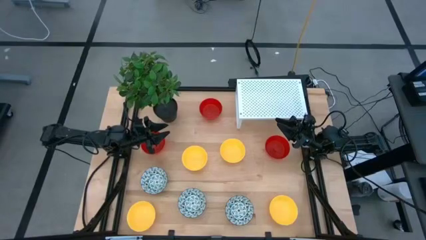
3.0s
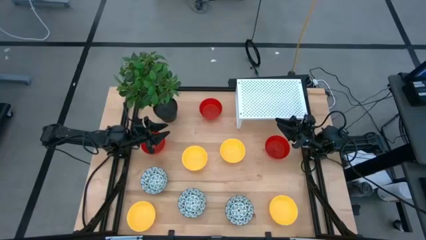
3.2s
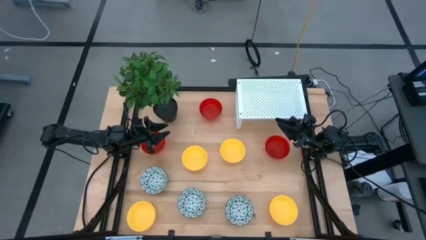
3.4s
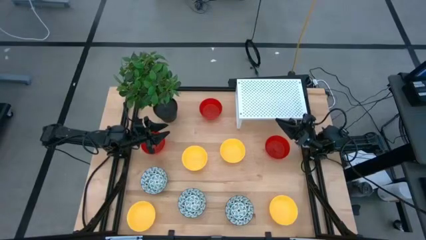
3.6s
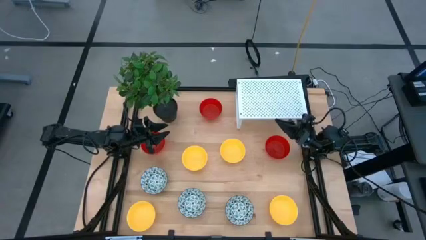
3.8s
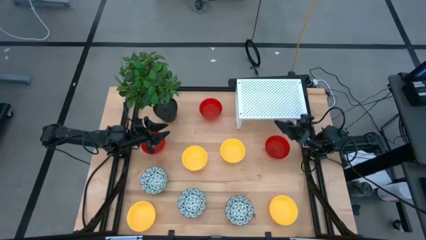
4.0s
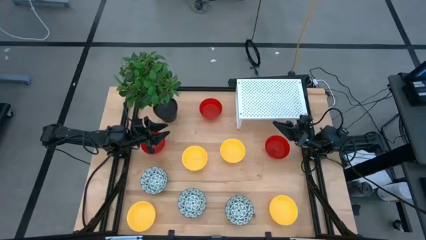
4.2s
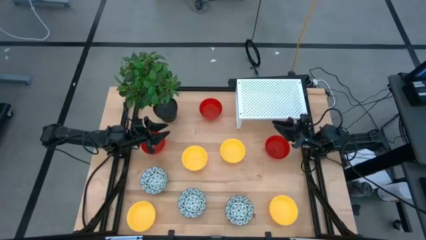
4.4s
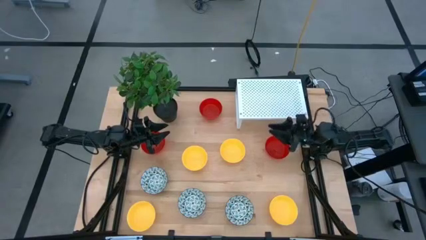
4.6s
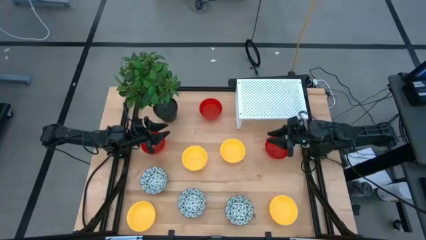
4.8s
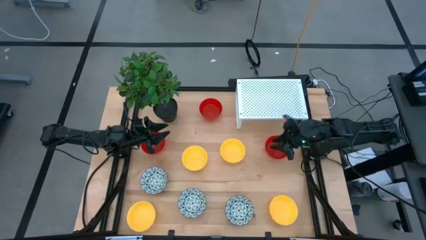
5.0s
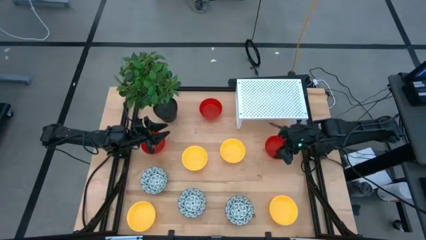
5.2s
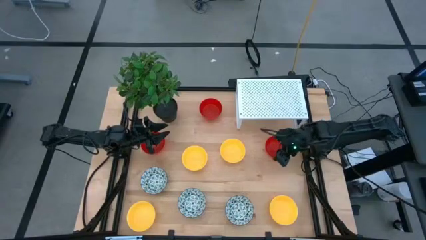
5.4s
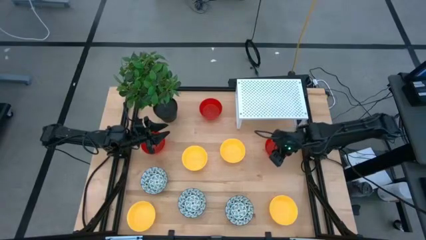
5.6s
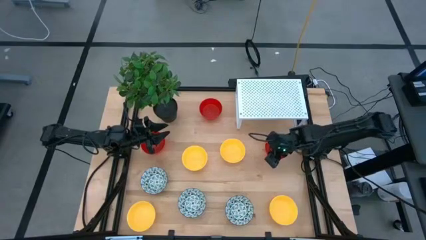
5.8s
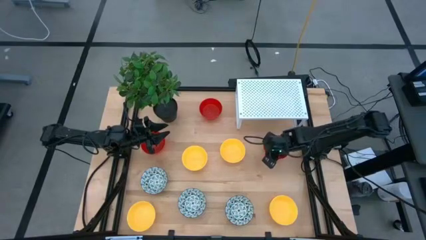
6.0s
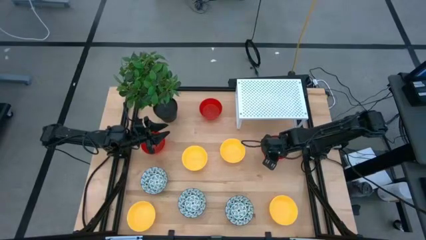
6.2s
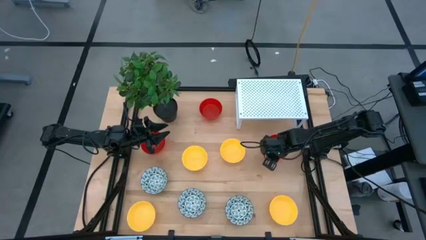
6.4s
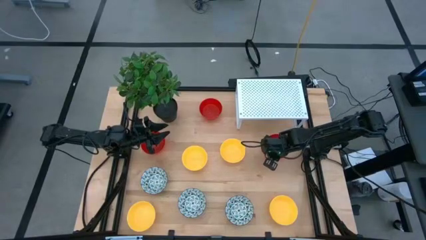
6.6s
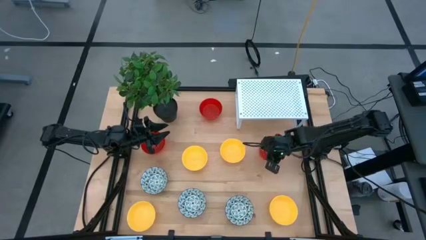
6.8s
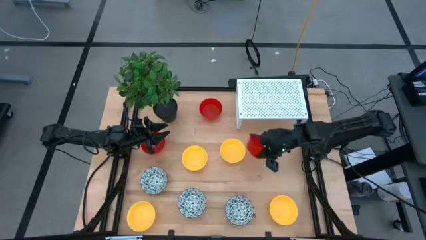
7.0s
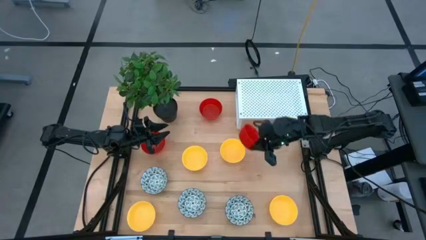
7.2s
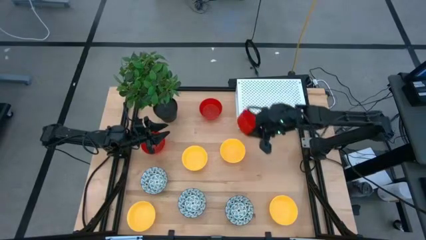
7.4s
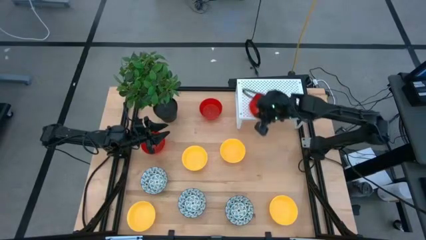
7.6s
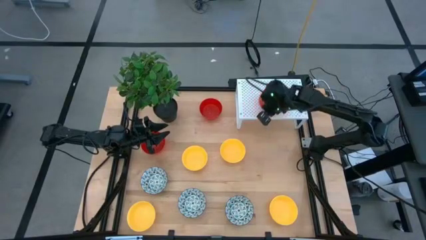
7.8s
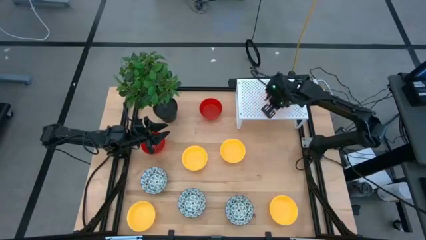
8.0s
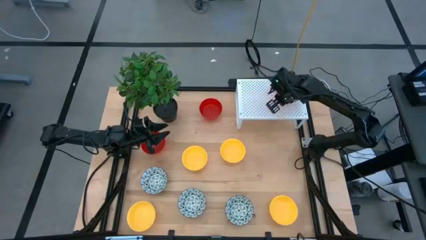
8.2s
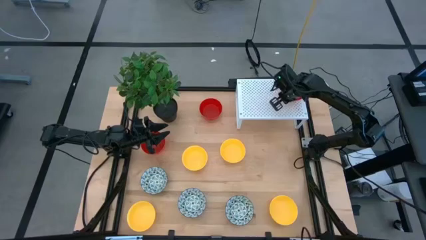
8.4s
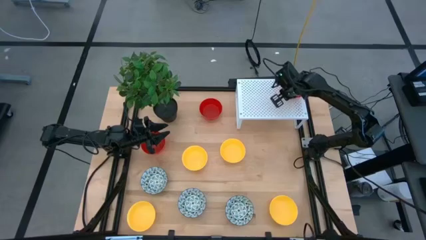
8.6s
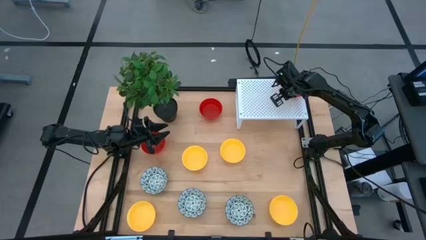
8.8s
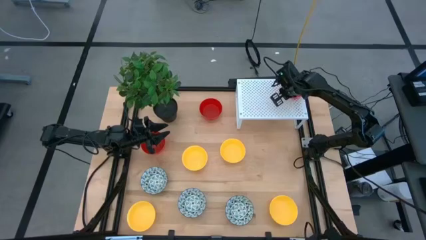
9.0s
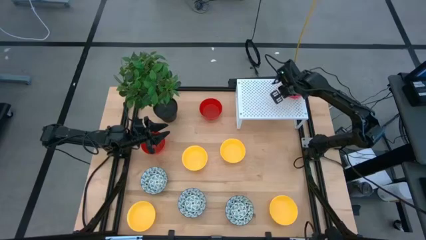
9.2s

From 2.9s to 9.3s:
Task: Pick & Place Mini bowls
Put the red bowl on the shelf

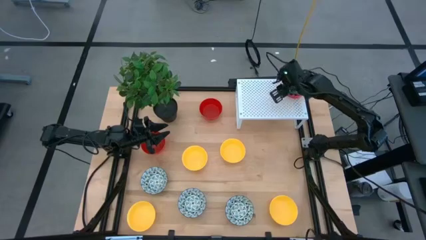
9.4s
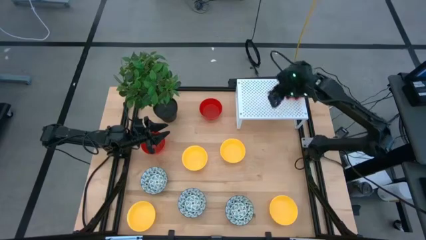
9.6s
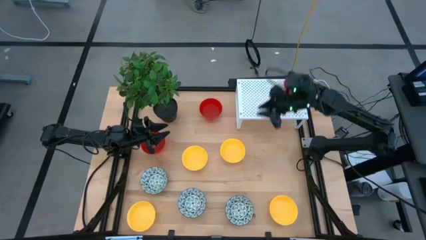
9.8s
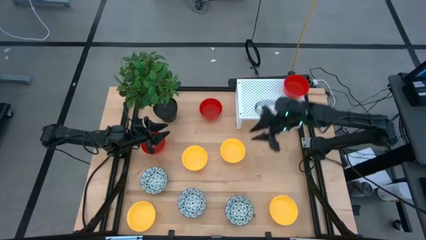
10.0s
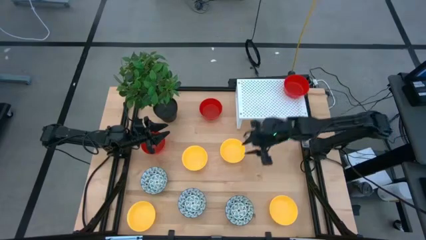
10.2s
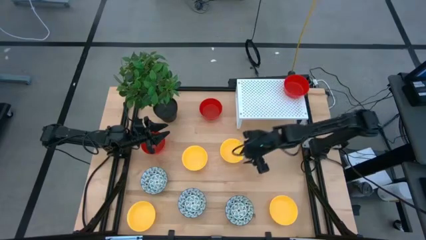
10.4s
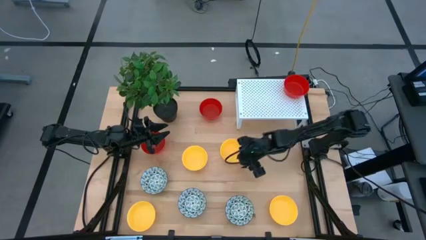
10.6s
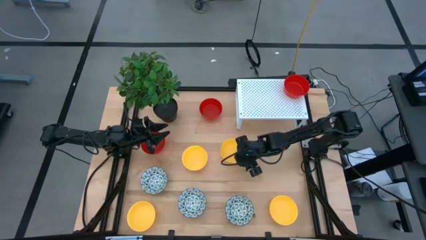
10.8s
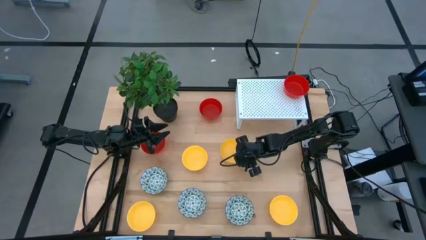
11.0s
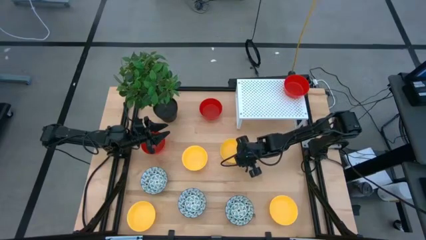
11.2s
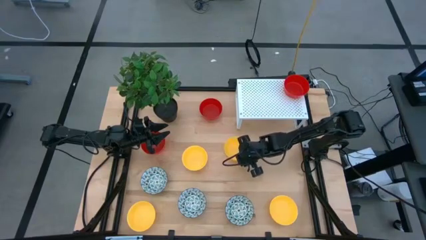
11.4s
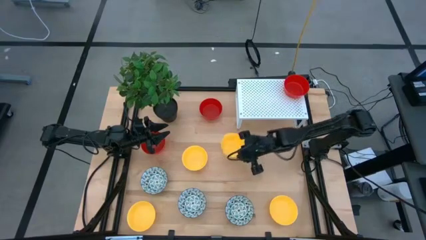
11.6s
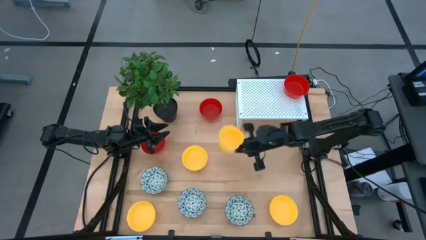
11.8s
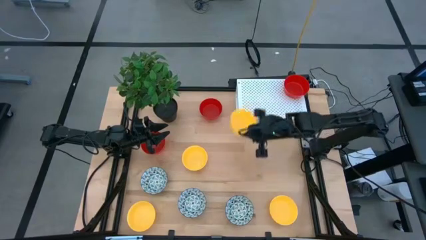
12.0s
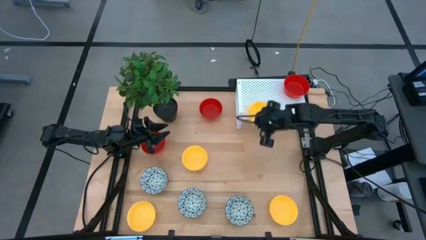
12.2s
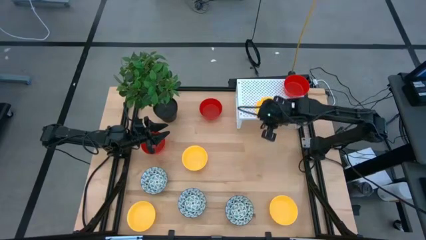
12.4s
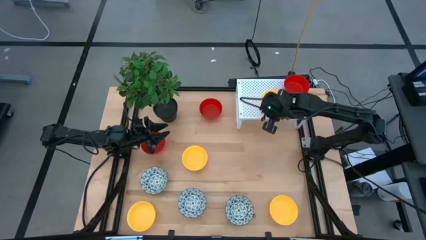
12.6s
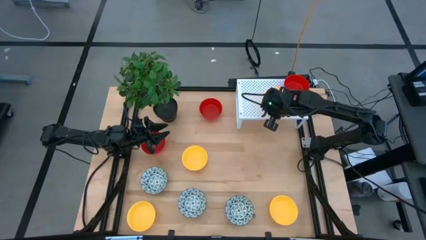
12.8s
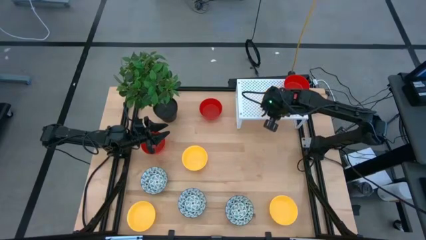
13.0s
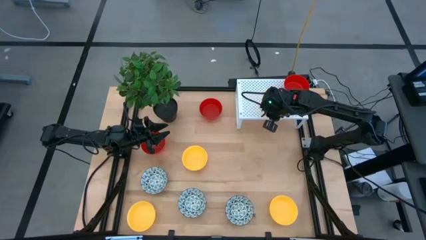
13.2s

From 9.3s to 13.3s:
Put the yellow bowl on the shelf

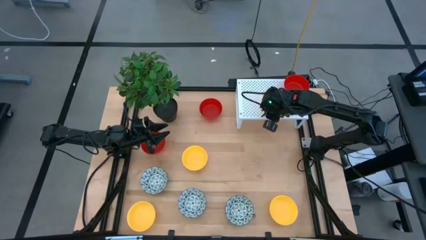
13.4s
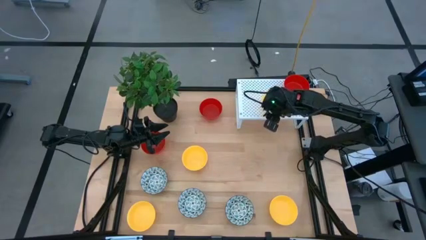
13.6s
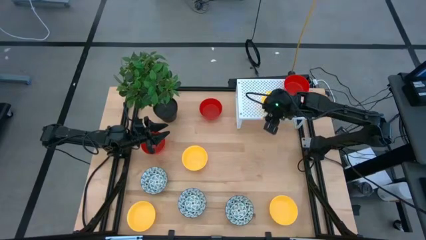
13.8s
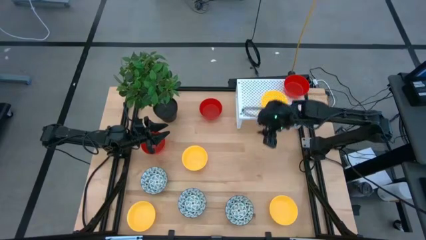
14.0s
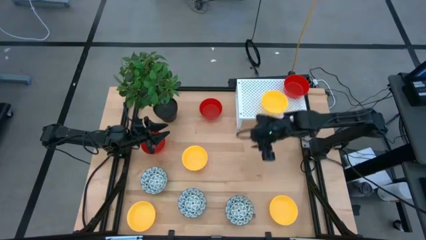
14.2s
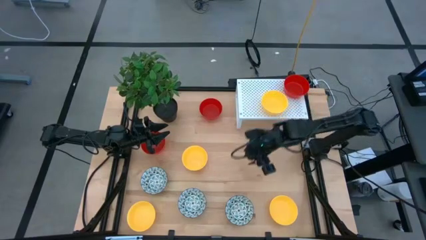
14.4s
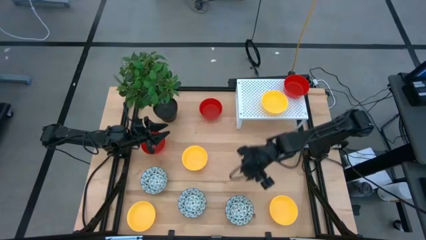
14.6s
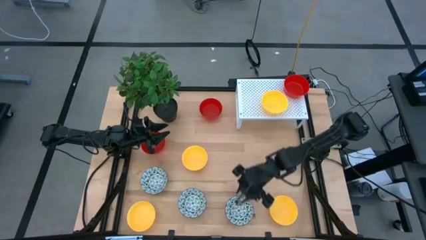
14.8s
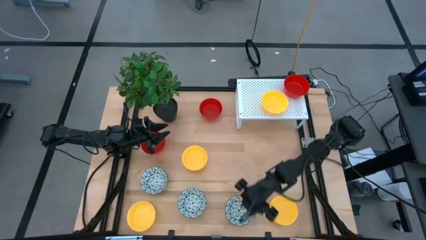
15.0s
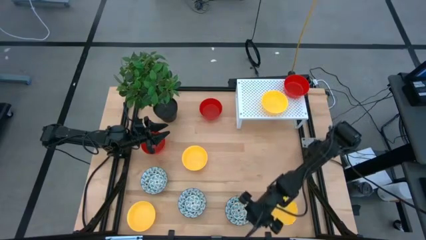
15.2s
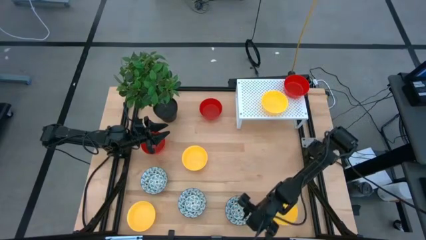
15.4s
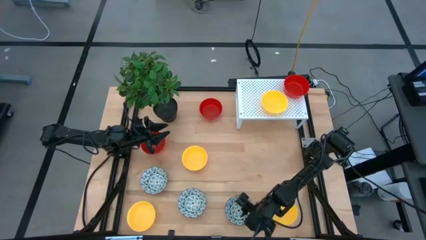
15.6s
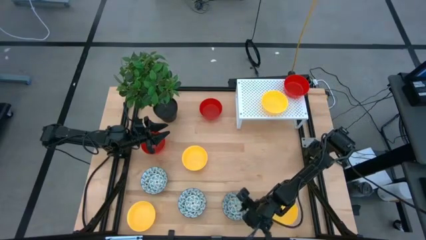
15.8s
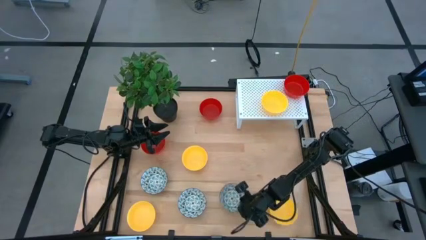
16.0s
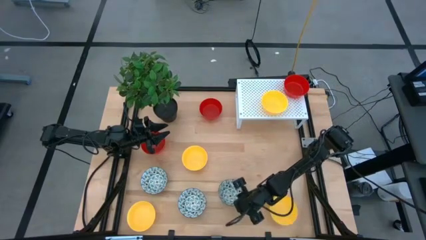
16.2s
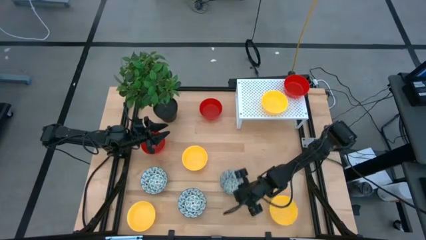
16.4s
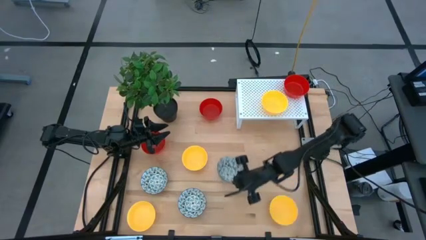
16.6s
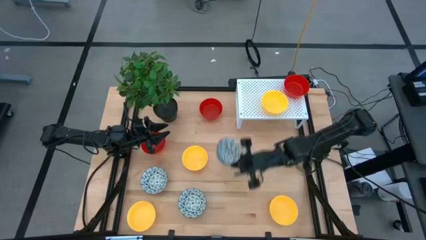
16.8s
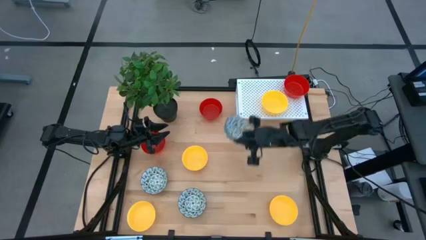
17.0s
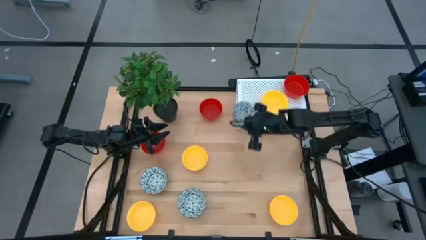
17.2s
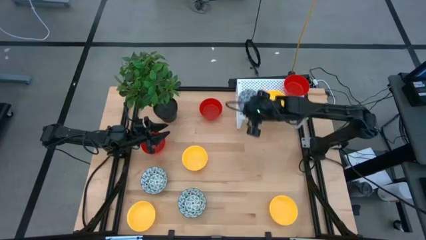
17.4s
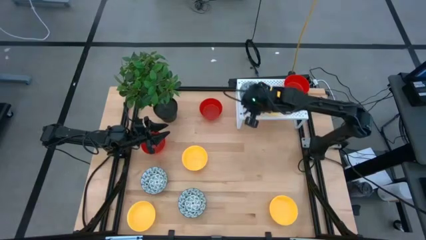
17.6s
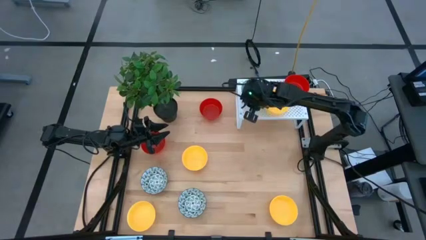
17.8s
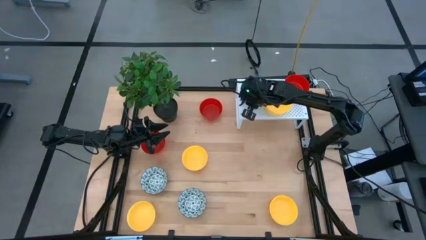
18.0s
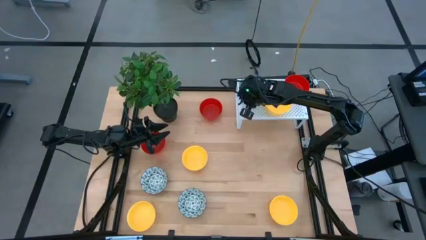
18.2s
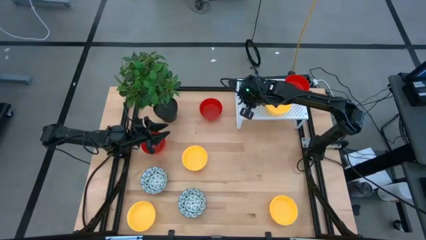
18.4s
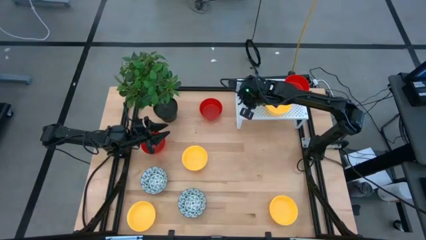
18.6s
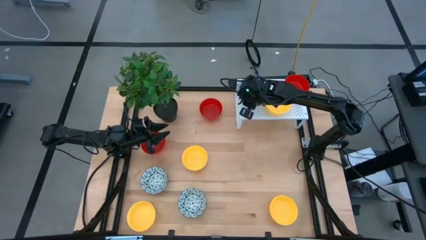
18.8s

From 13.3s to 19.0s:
Put the blue bowl on the shelf
